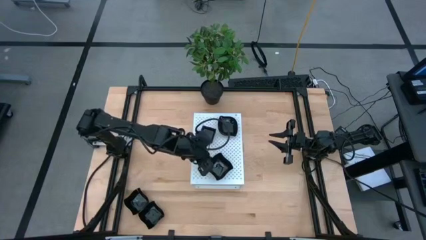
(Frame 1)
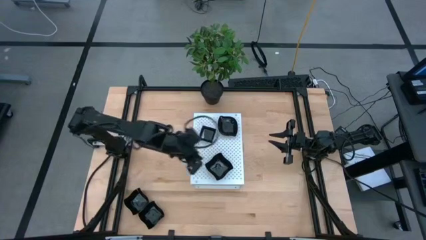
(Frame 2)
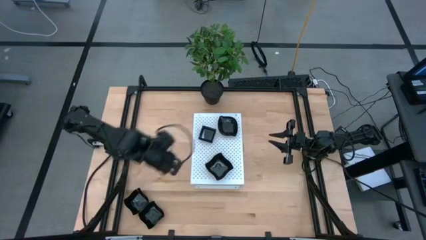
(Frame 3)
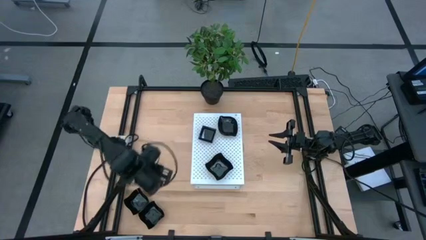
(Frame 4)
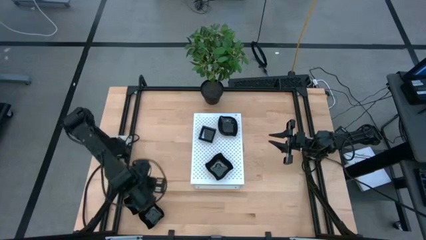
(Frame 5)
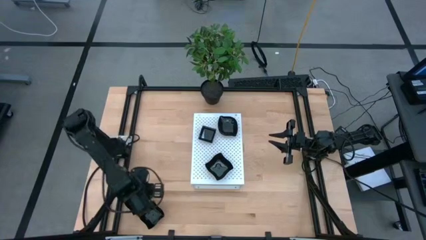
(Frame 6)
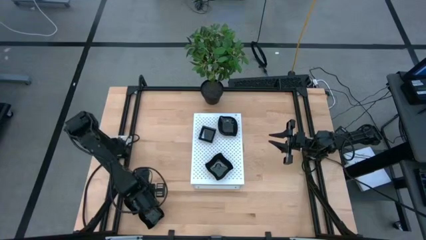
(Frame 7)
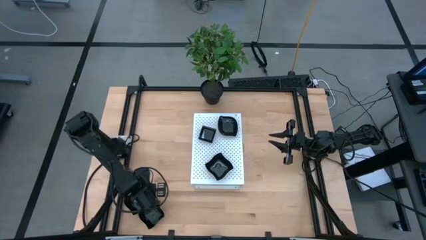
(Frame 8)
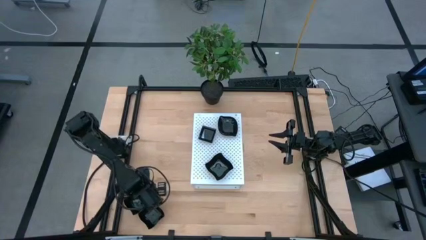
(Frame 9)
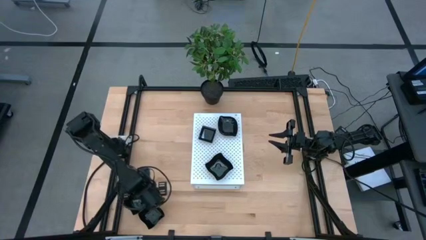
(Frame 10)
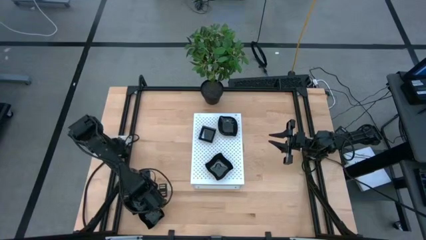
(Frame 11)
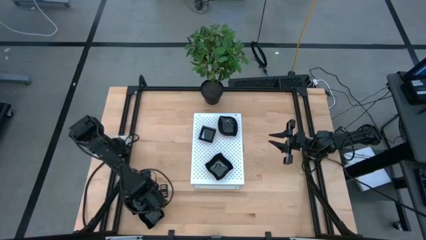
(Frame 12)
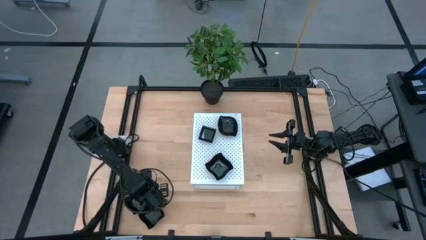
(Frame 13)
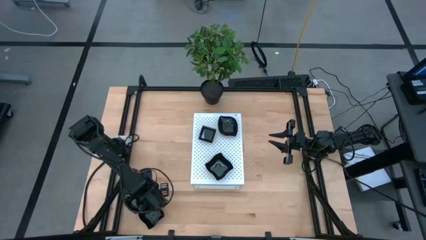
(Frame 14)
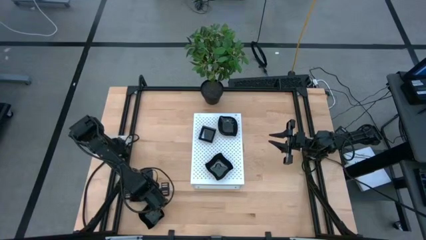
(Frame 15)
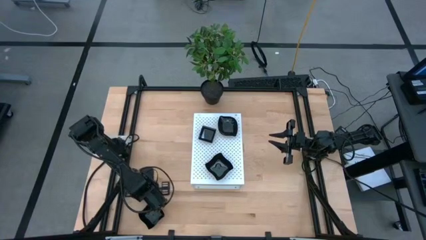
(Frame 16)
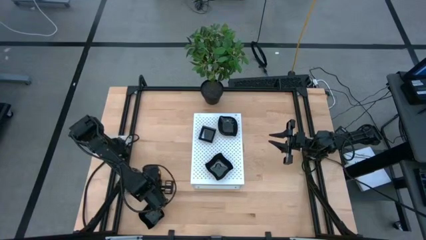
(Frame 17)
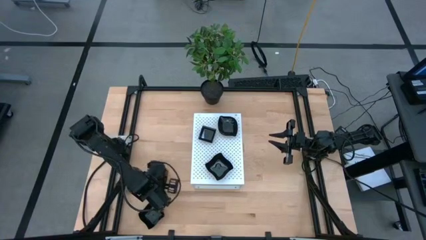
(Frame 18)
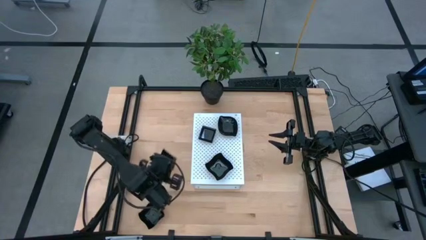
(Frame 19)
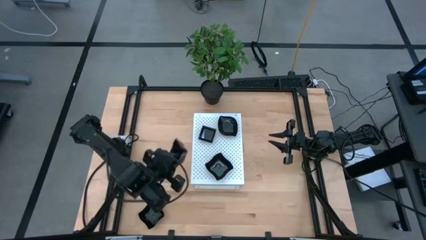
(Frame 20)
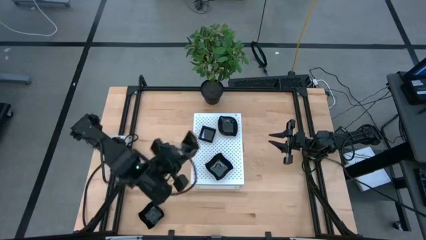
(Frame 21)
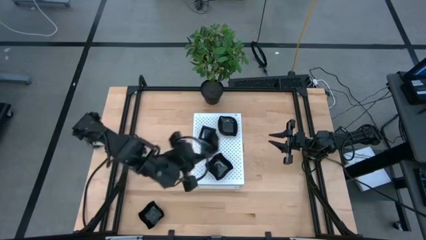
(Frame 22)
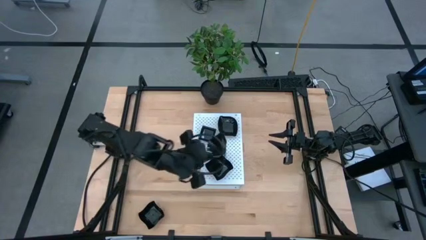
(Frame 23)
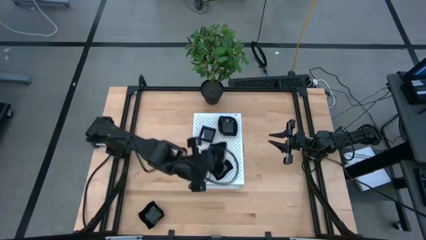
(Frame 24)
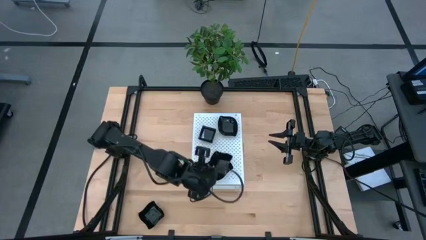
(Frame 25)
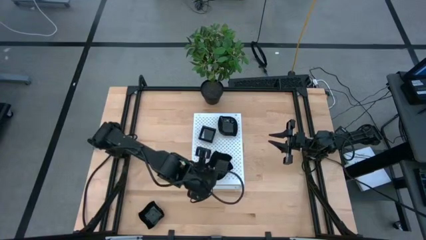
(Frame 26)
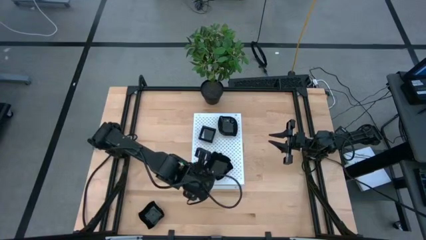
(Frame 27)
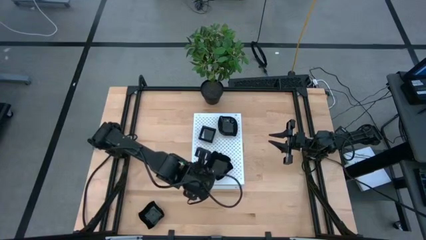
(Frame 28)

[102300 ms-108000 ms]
Task: Pick & Place Mini shaped plates
Stack the black distorted square plate on top of the the black distorted square plate on the shelf

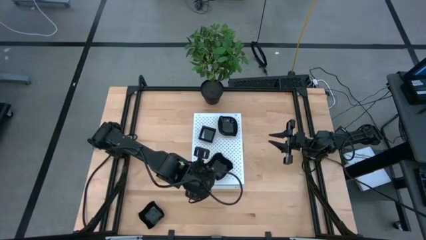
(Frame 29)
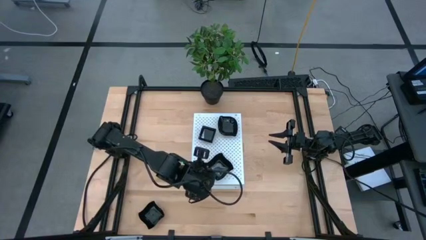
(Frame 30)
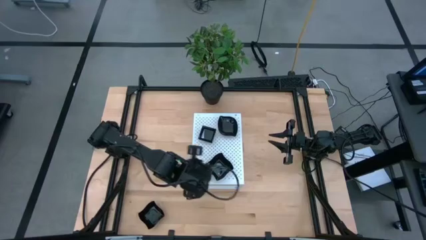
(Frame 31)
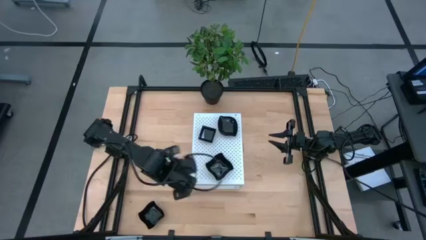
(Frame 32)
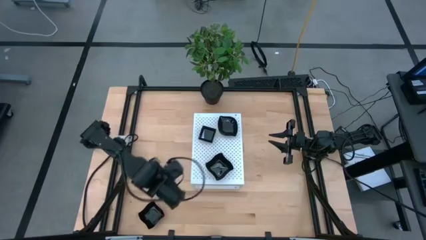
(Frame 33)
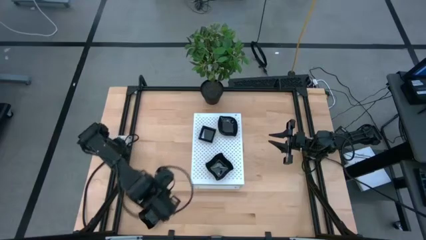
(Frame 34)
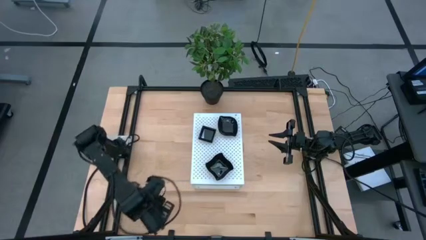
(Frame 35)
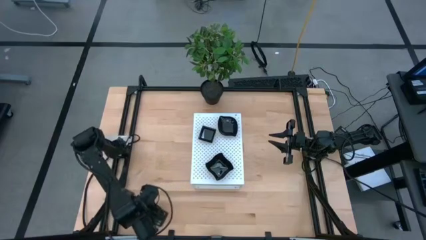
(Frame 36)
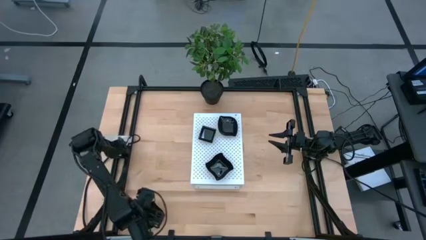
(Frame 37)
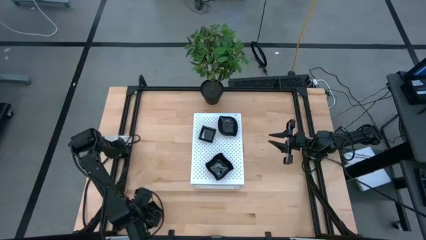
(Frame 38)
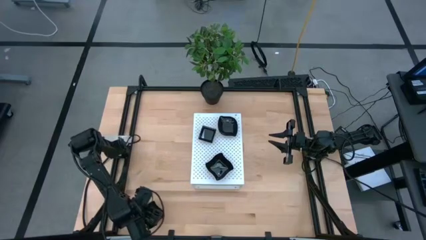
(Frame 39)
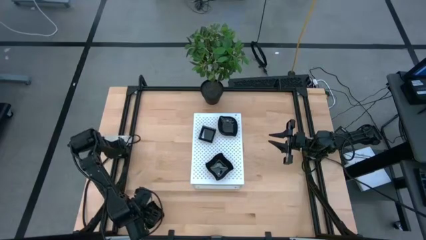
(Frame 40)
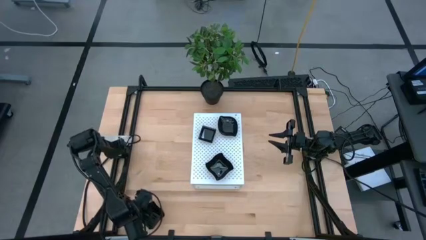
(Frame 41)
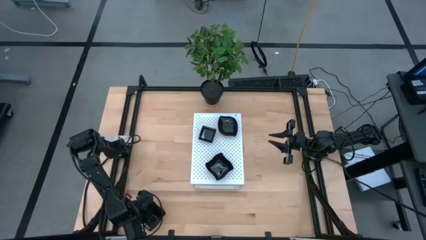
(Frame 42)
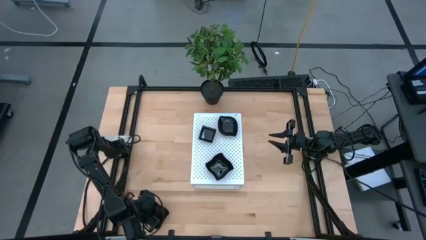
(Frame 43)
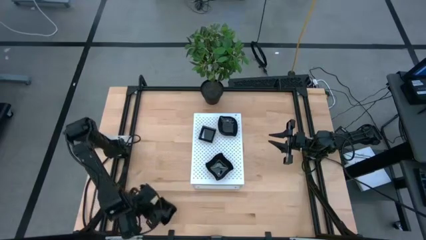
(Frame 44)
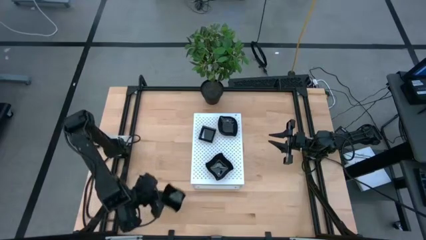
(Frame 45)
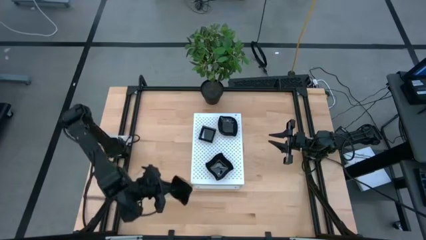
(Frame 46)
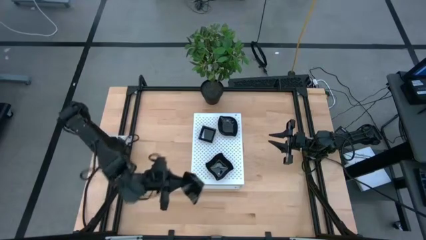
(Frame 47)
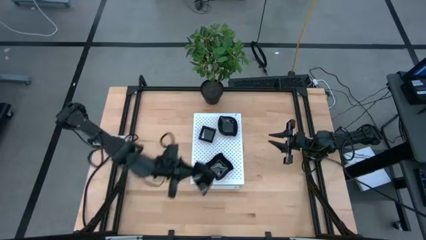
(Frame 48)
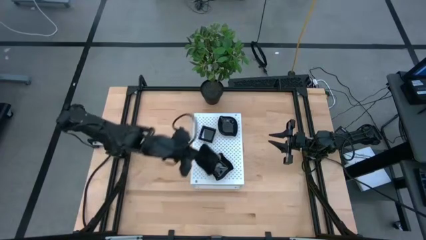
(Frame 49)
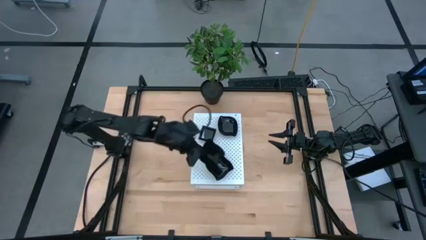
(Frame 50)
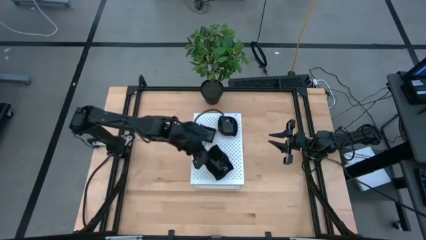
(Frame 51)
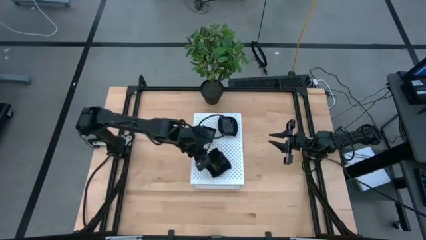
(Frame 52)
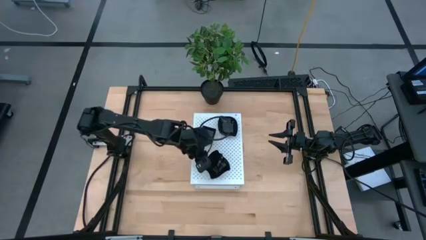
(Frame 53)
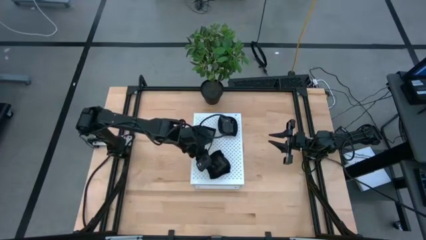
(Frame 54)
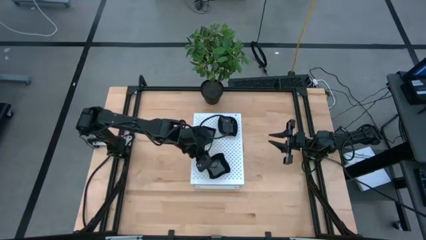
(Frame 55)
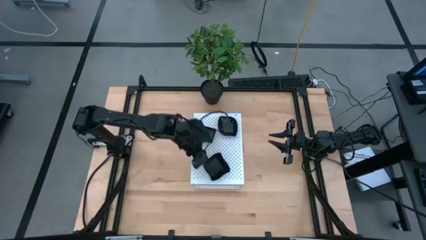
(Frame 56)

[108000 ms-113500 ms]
Stack the black distorted square plate on top of the the black distorted square plate on the shelf
